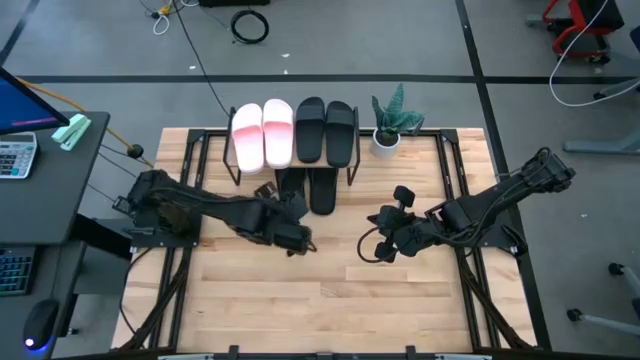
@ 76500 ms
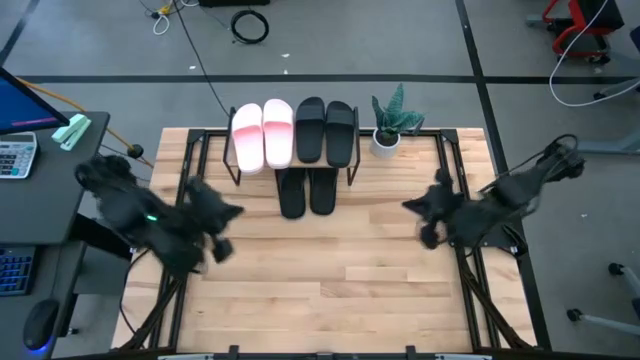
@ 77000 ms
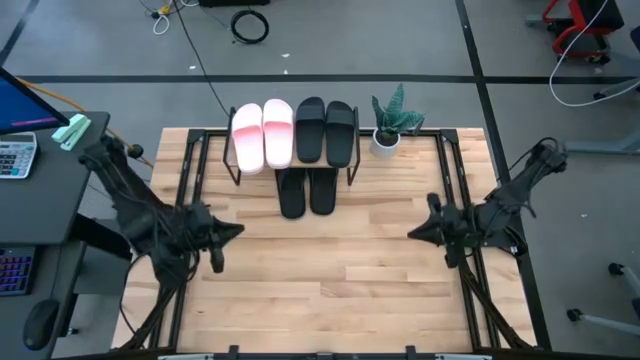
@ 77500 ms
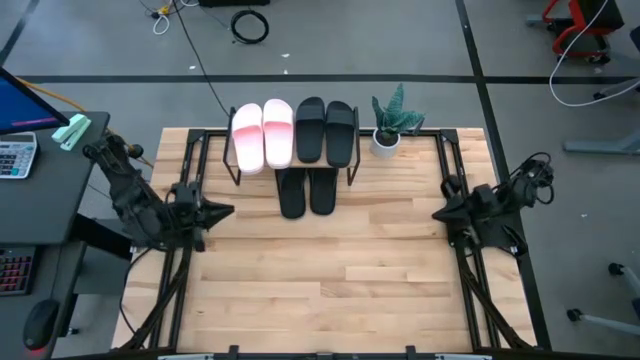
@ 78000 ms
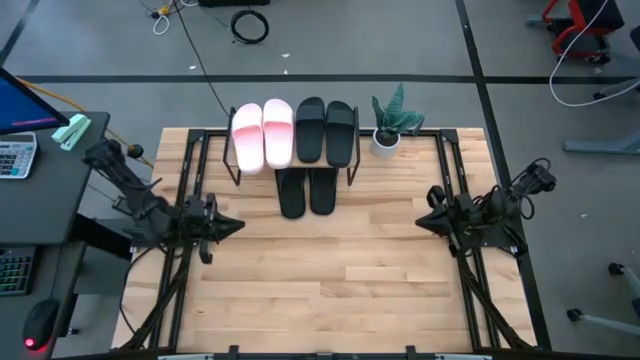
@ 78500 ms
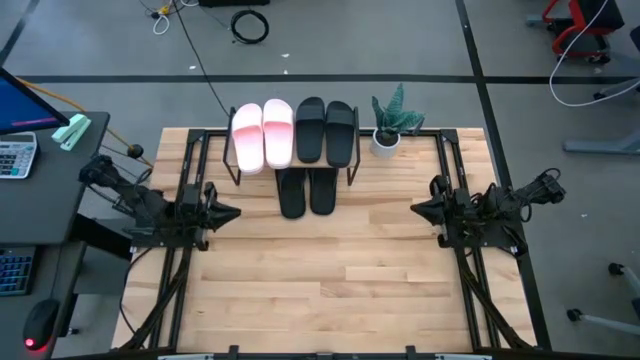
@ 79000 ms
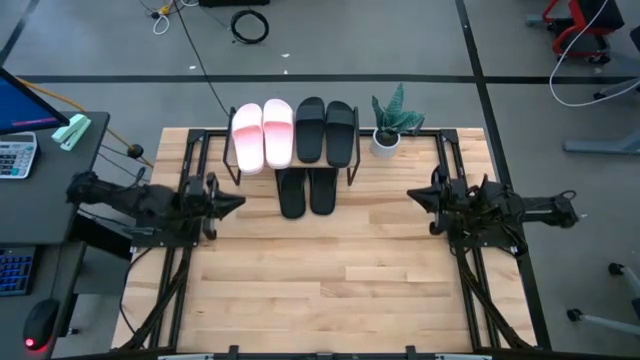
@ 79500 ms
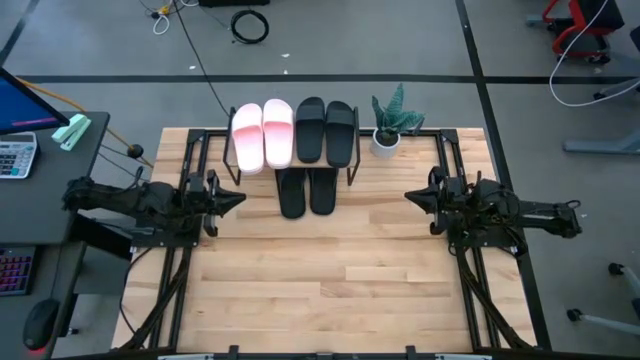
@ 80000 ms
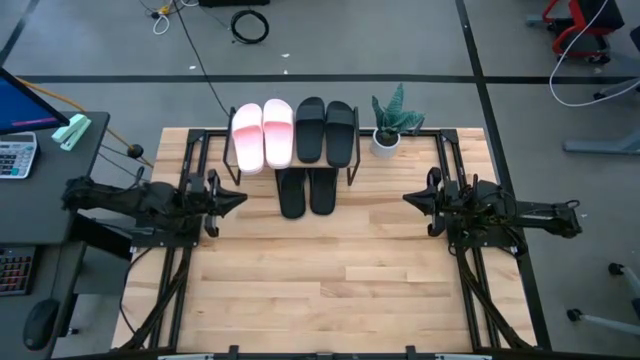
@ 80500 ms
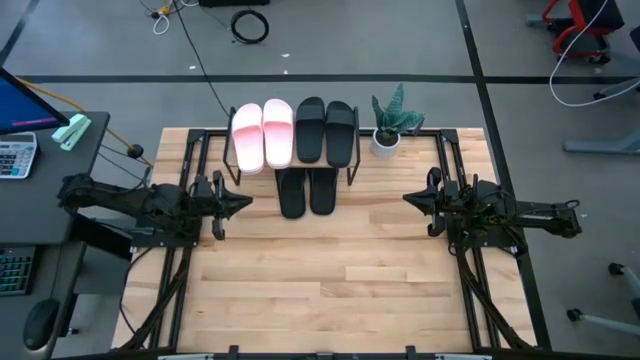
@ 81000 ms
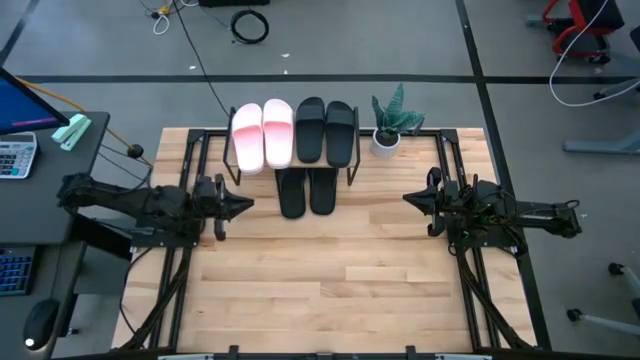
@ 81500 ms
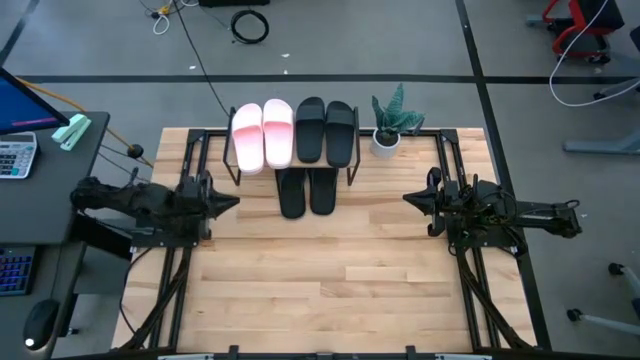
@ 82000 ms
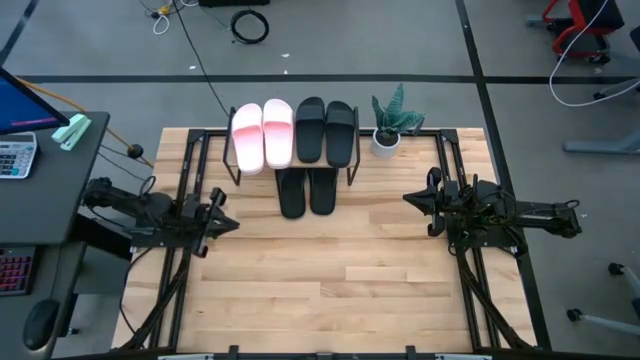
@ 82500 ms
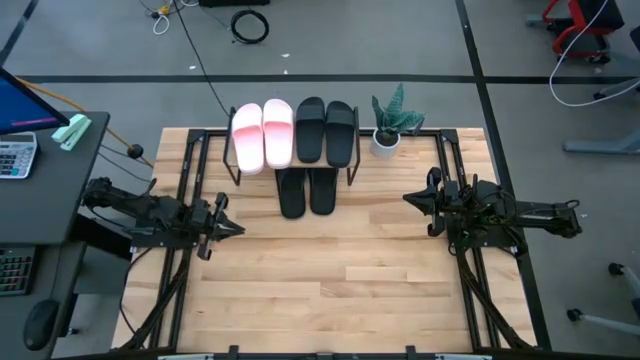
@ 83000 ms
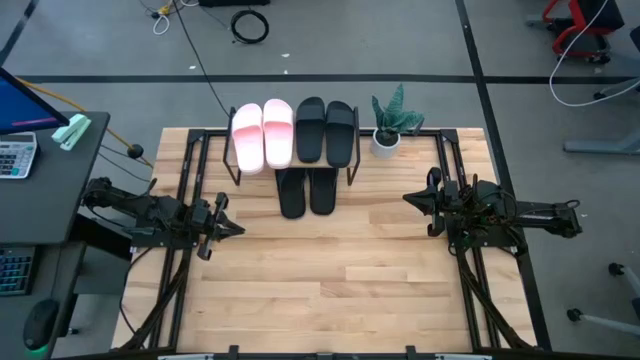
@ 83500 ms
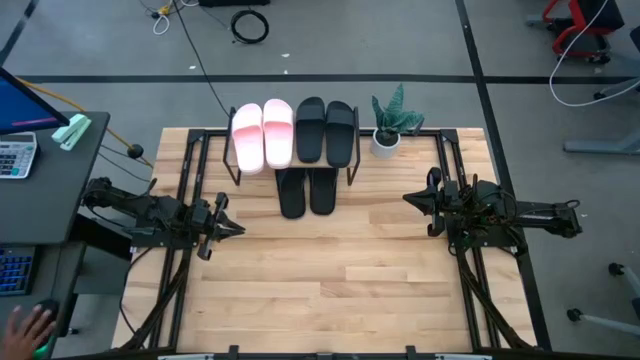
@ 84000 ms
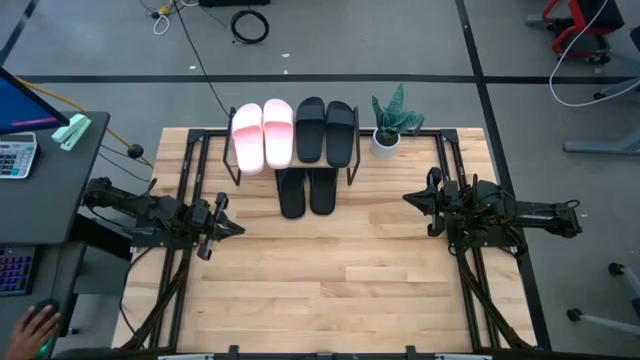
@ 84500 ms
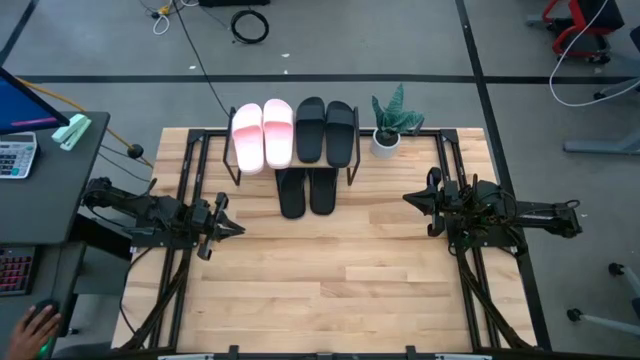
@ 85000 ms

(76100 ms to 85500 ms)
Task: Pick and place slides into the shelf
Return to Home Position

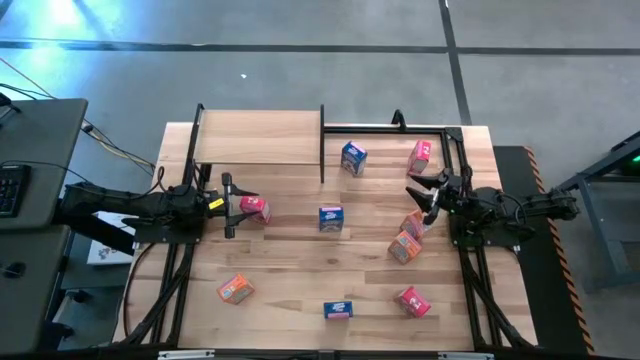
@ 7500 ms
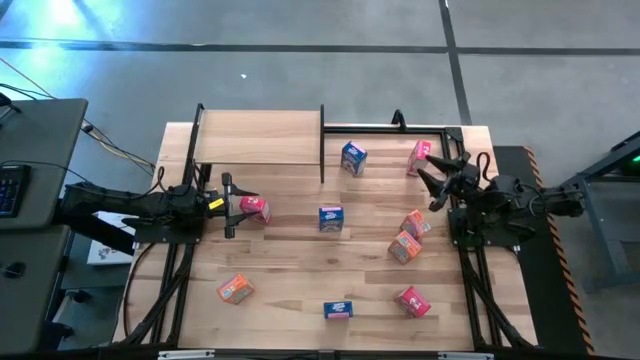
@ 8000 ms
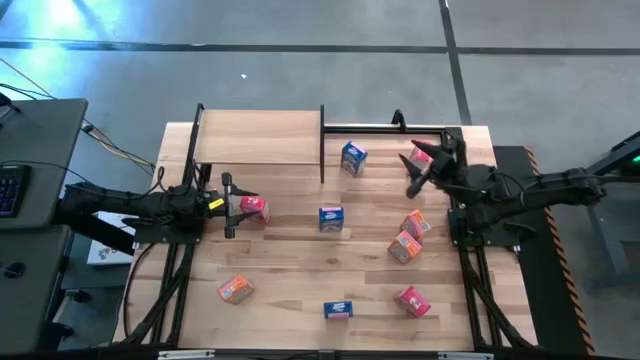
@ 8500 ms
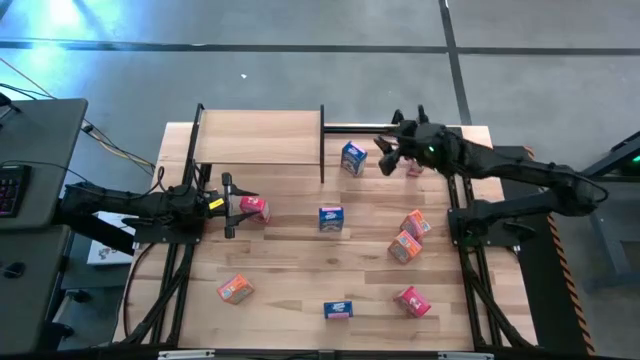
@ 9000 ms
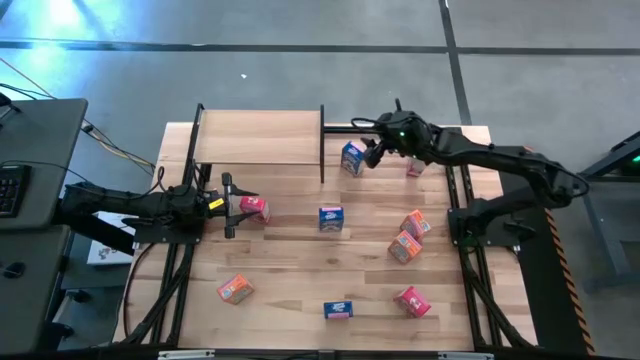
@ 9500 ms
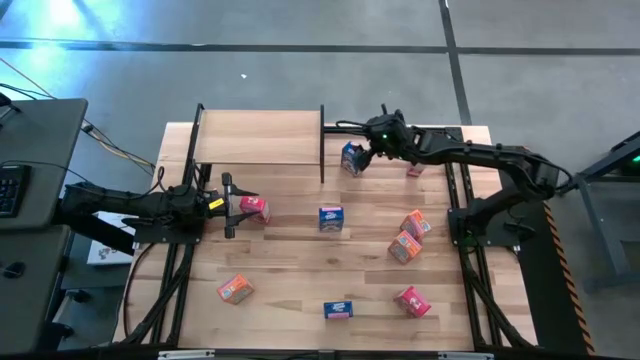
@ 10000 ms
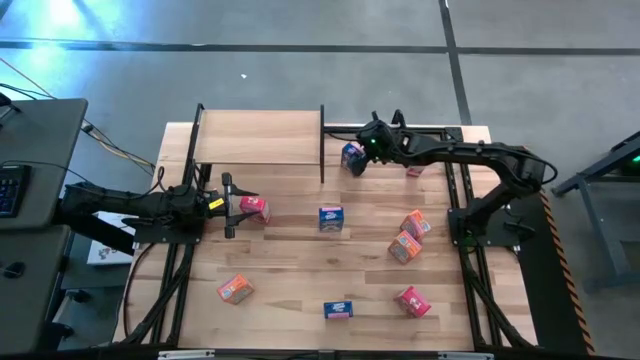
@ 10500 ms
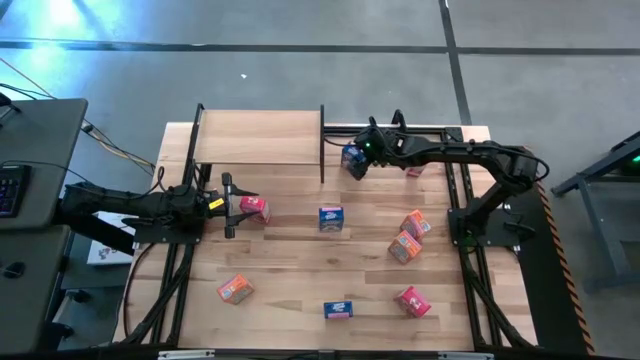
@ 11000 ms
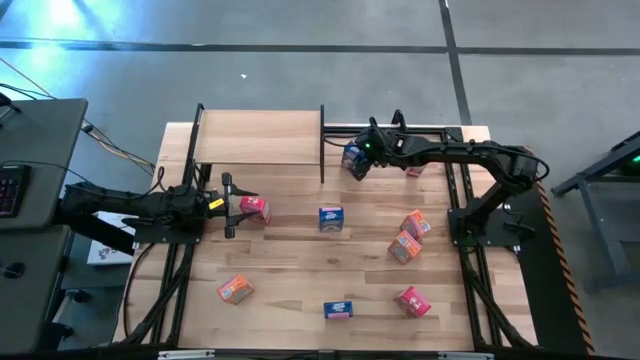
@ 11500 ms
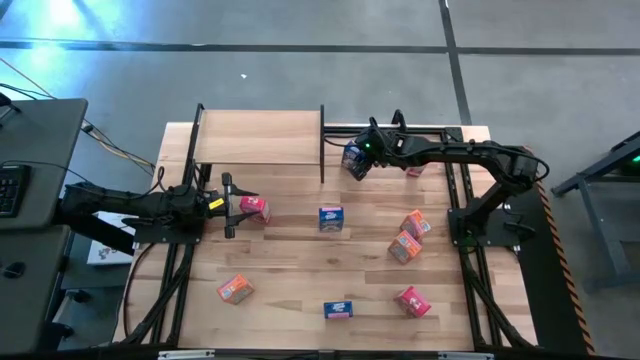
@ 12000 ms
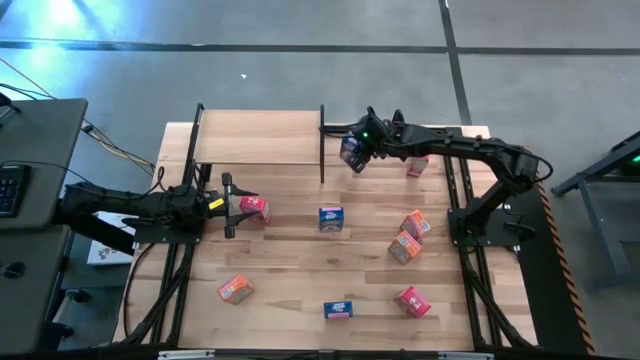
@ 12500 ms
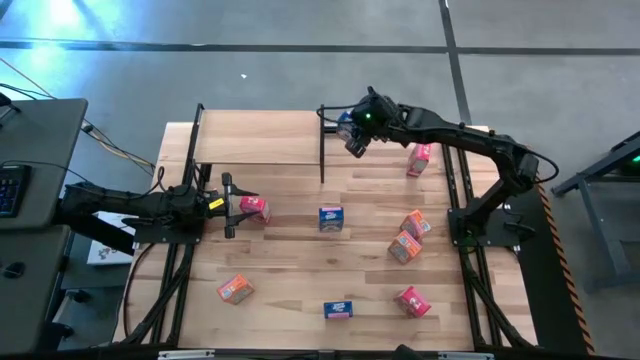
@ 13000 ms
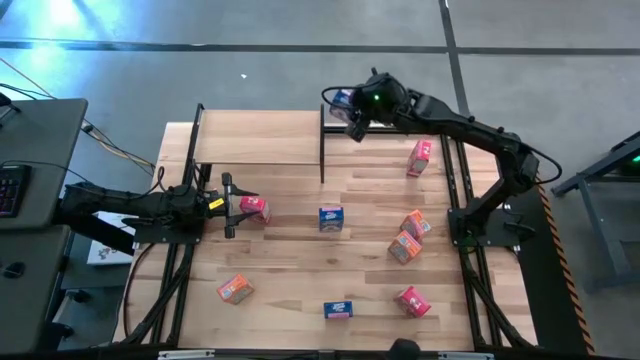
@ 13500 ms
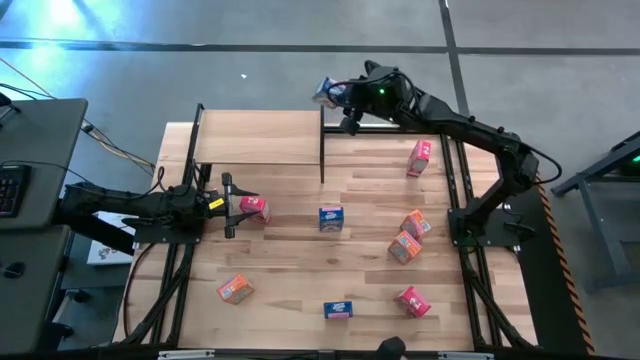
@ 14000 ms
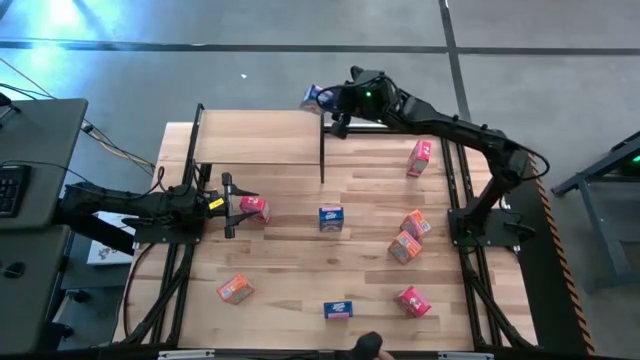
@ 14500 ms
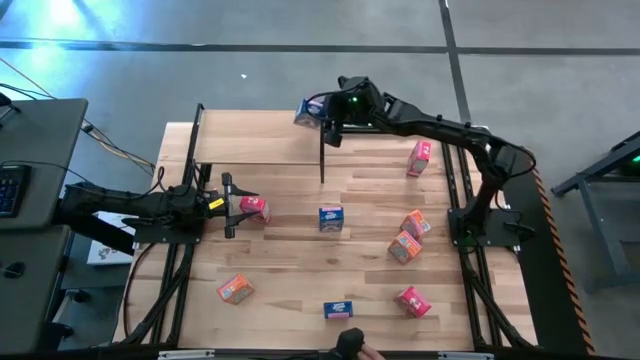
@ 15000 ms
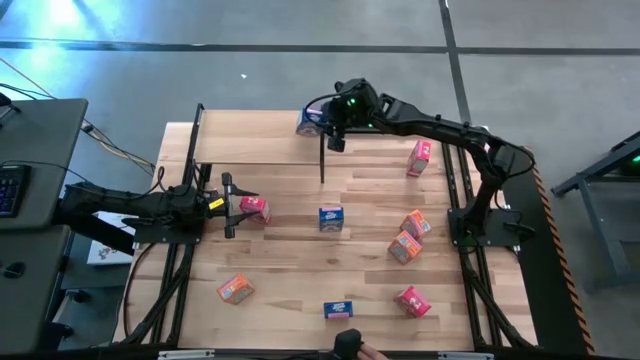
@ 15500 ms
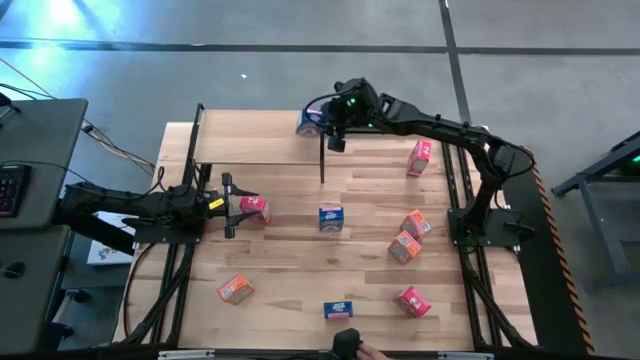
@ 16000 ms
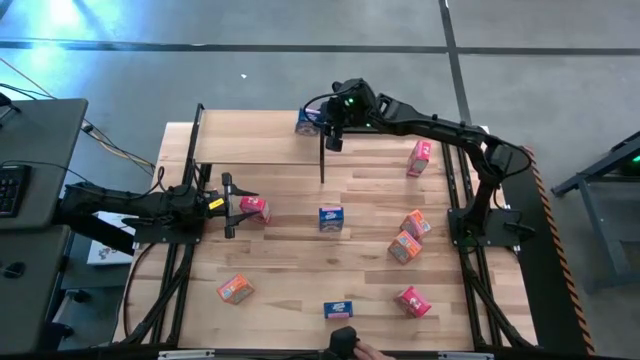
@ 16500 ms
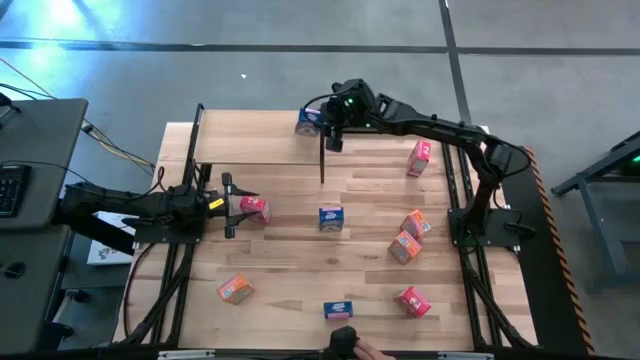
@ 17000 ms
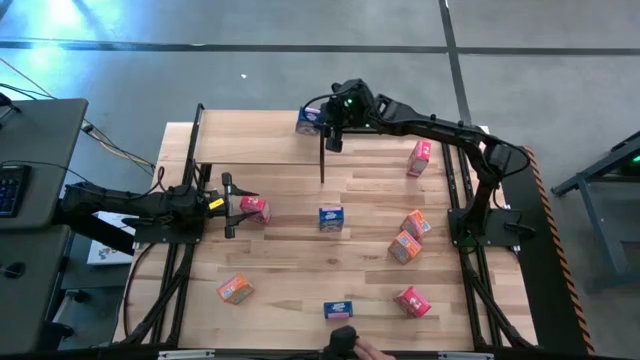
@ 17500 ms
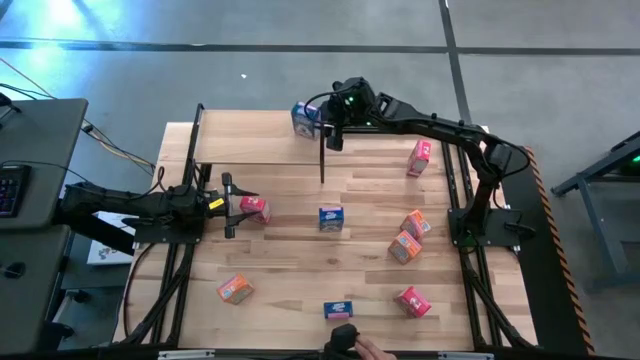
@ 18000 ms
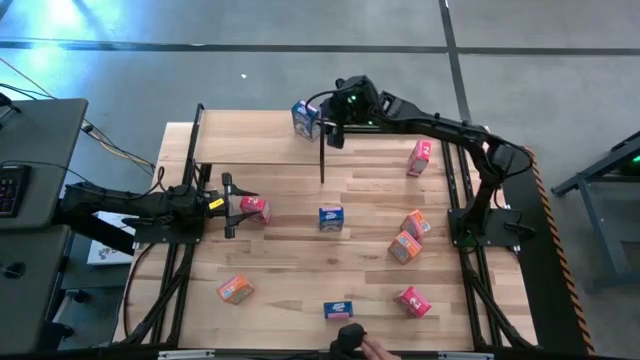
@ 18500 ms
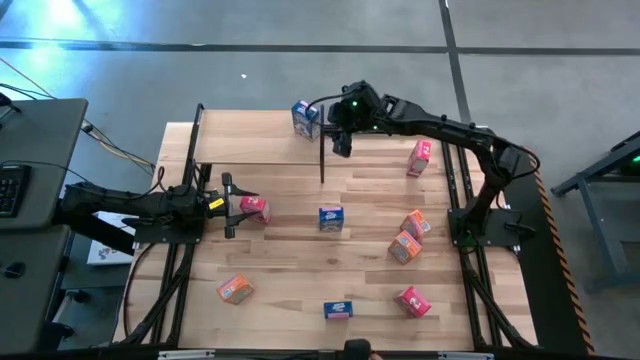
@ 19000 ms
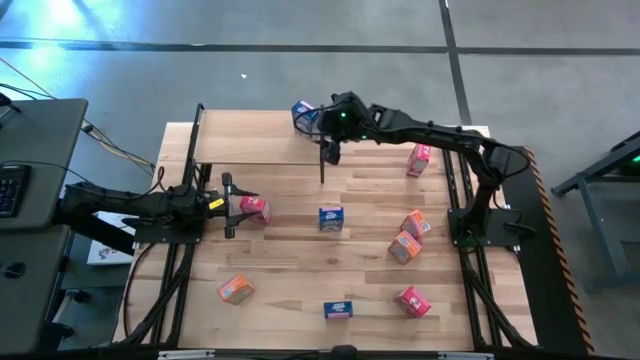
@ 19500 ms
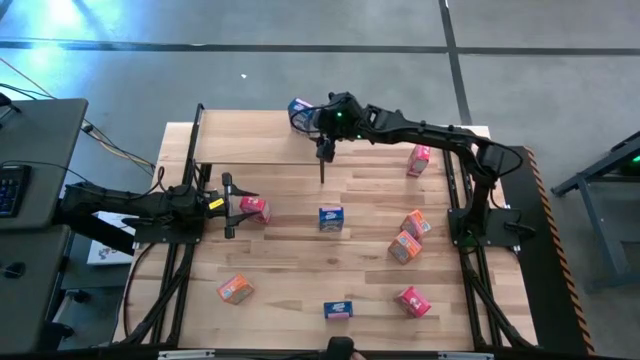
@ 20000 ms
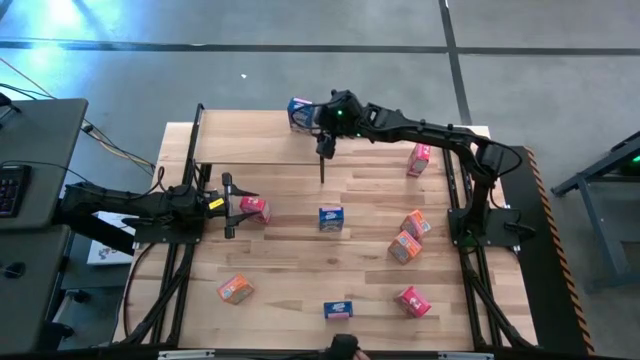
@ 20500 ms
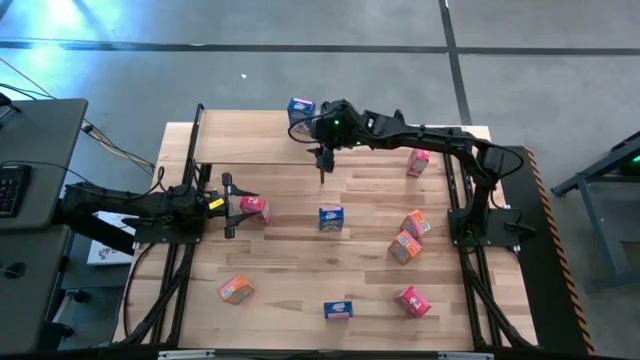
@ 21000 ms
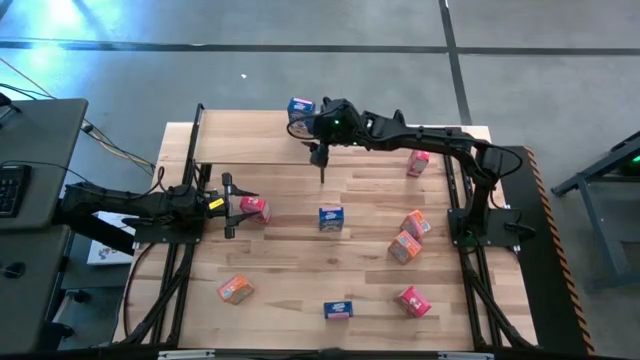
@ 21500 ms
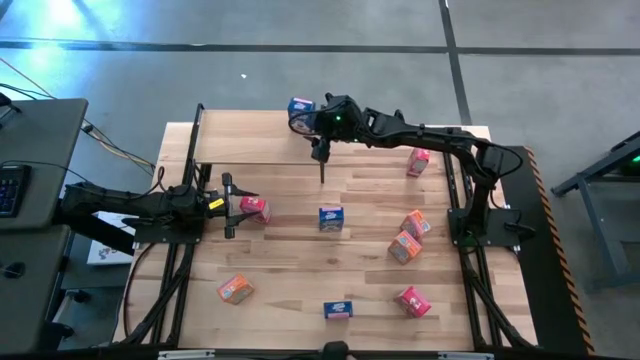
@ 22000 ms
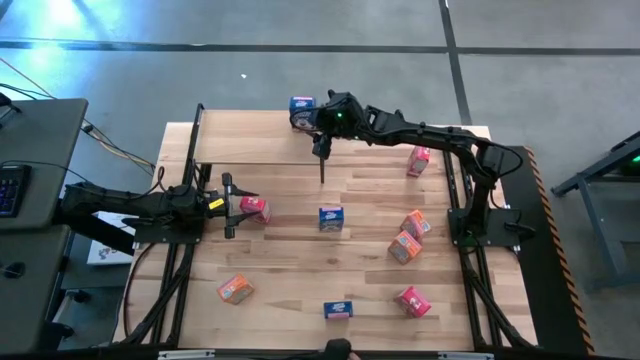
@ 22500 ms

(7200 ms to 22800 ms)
Task: Stack cereal on shelf
Put the top blue cereal box on the the shelf
